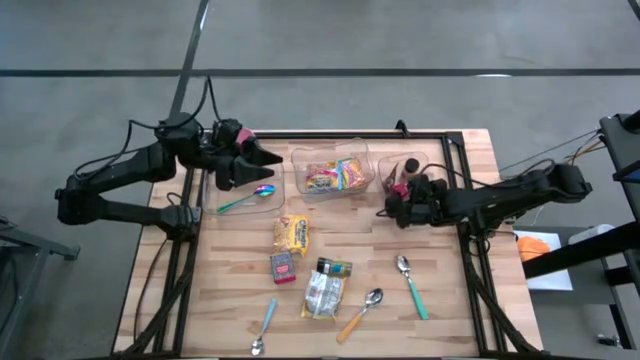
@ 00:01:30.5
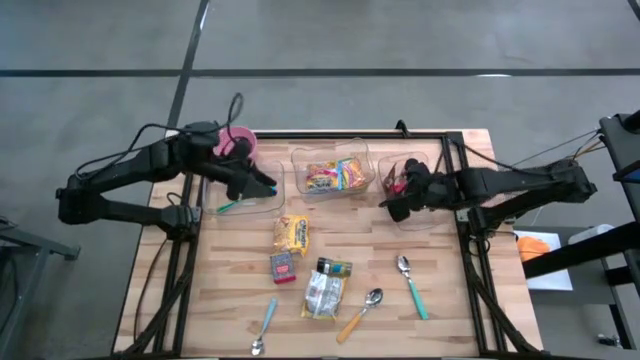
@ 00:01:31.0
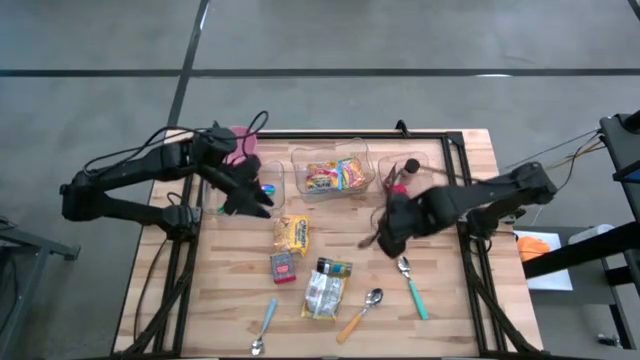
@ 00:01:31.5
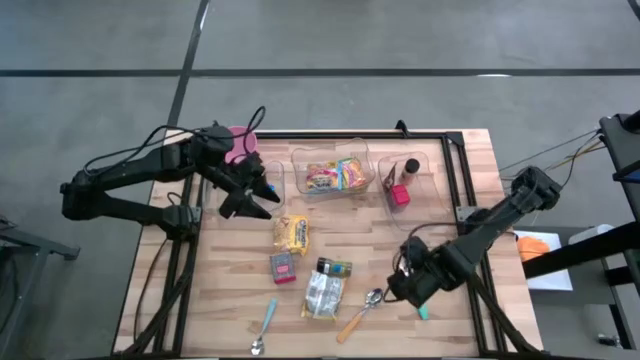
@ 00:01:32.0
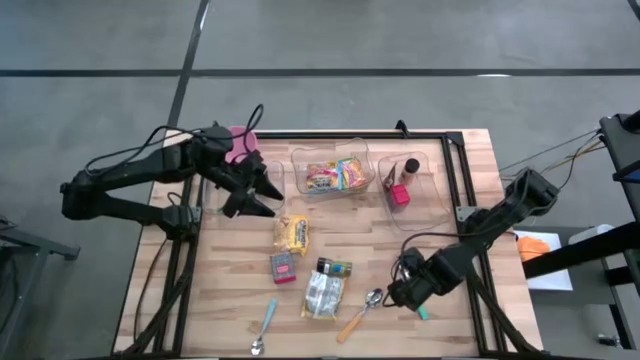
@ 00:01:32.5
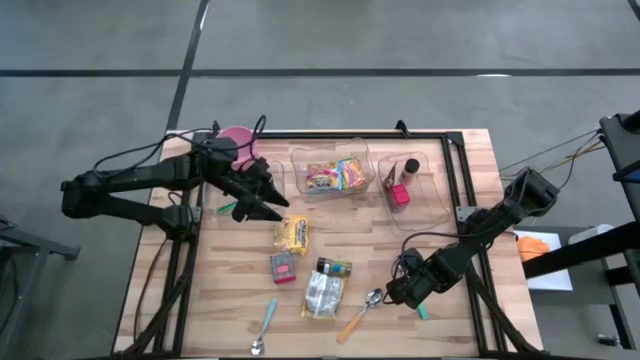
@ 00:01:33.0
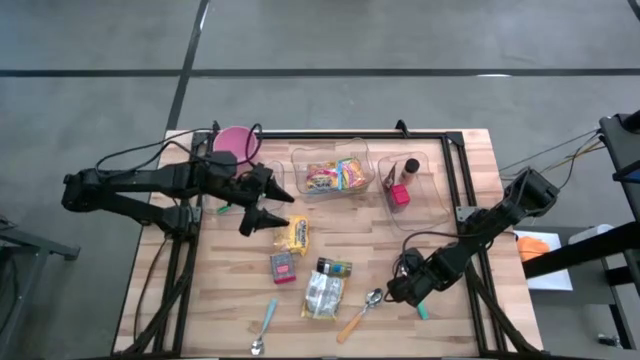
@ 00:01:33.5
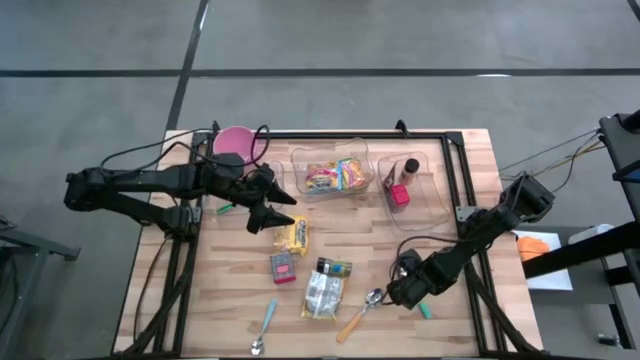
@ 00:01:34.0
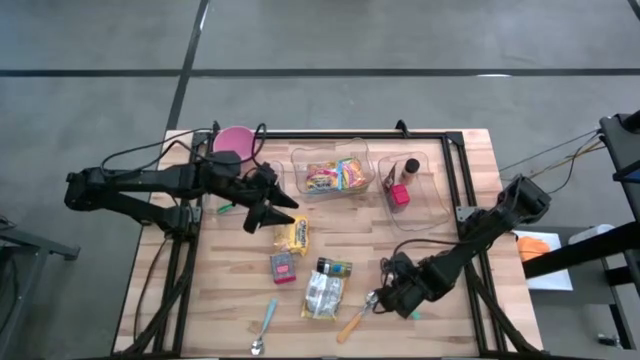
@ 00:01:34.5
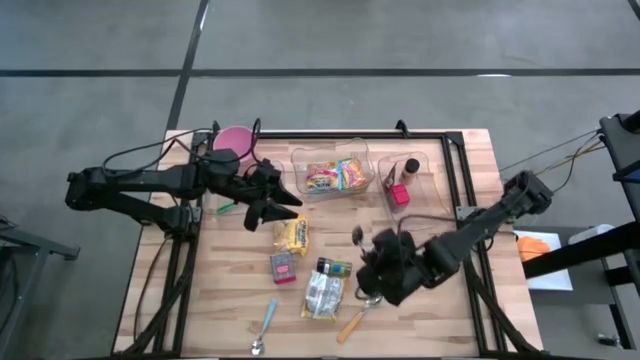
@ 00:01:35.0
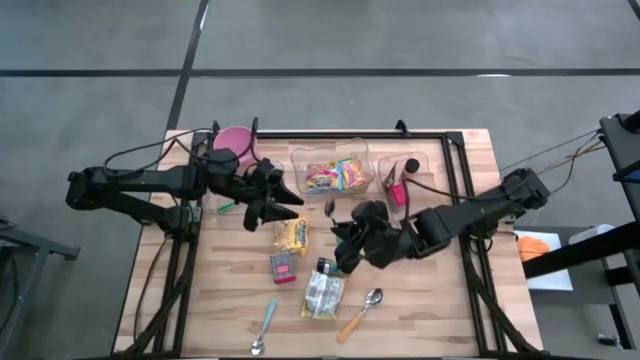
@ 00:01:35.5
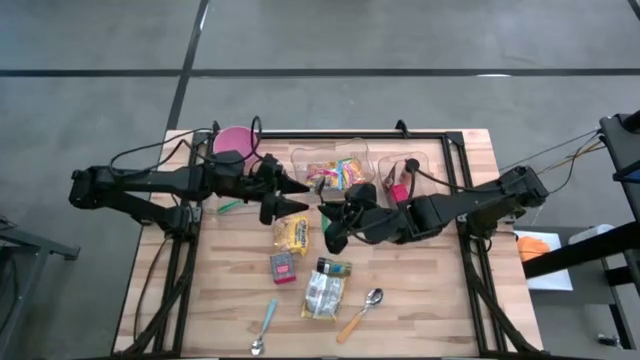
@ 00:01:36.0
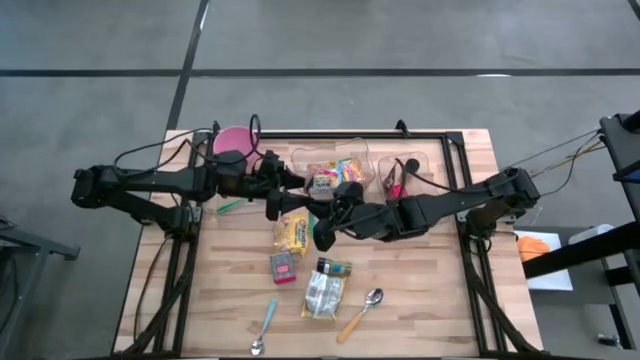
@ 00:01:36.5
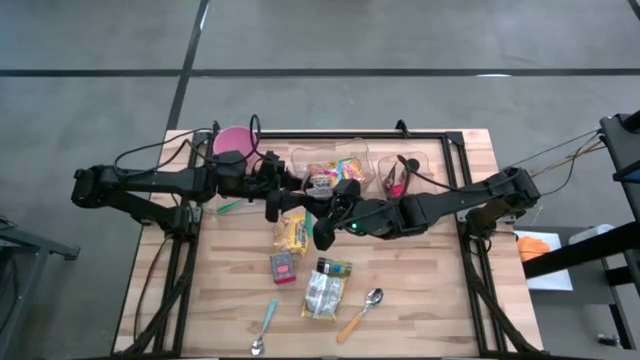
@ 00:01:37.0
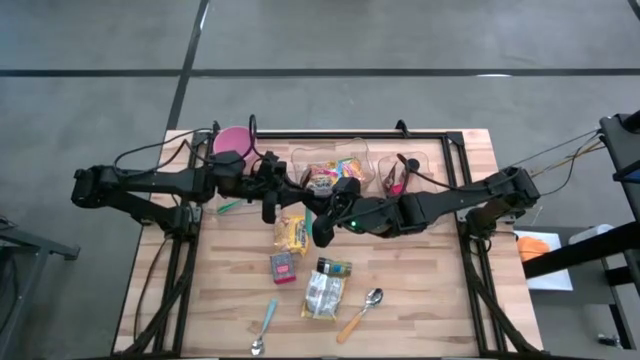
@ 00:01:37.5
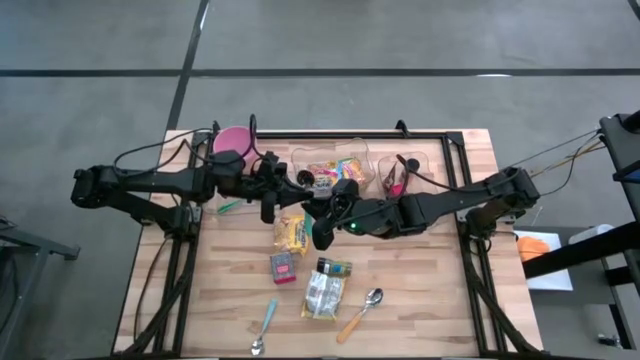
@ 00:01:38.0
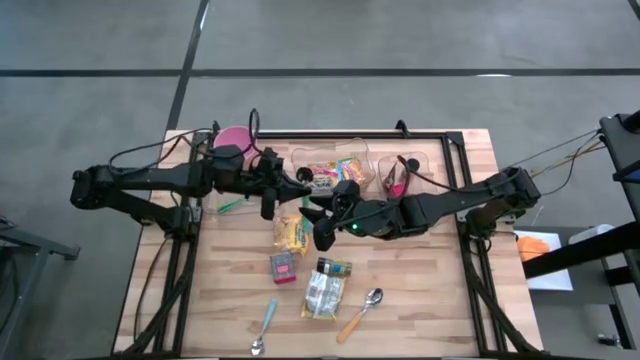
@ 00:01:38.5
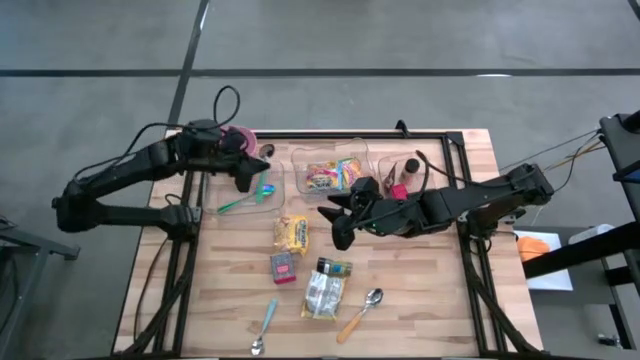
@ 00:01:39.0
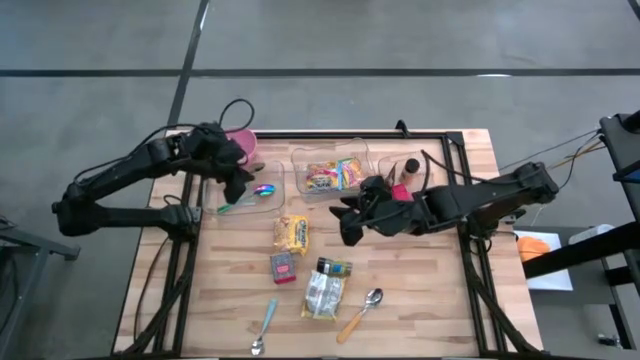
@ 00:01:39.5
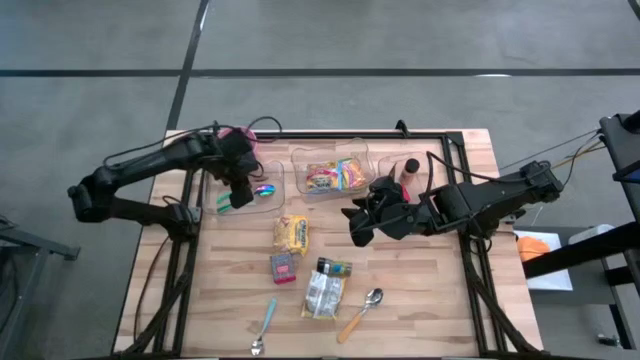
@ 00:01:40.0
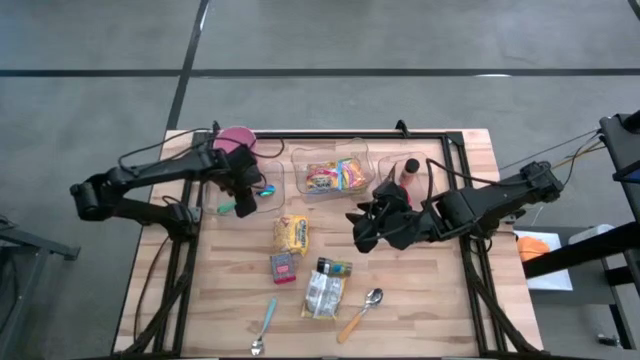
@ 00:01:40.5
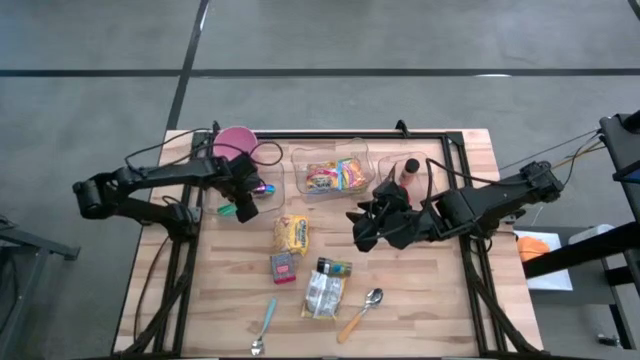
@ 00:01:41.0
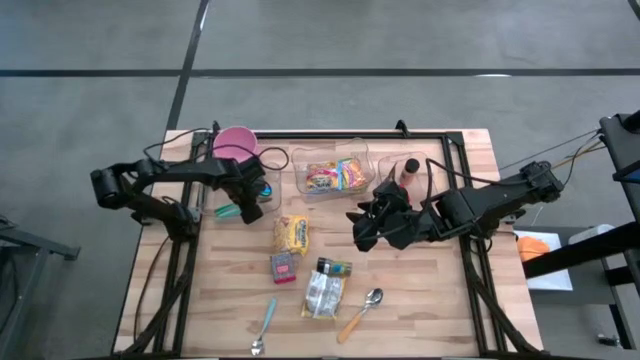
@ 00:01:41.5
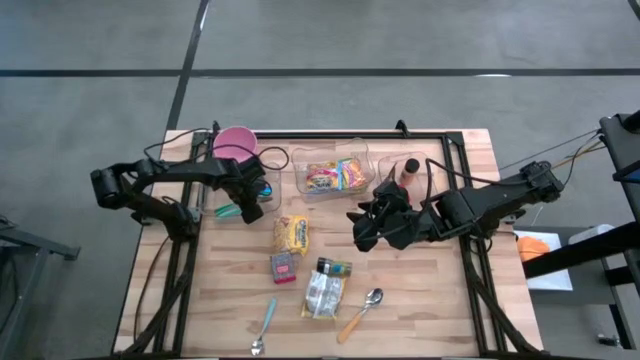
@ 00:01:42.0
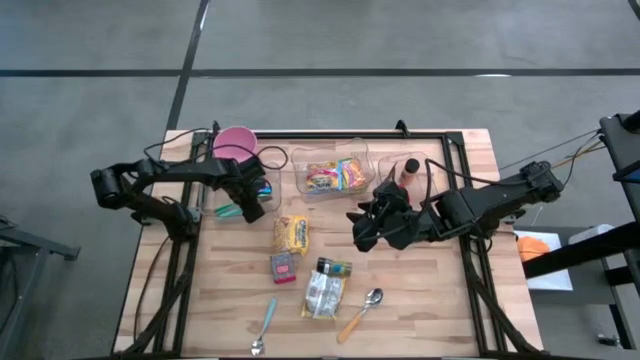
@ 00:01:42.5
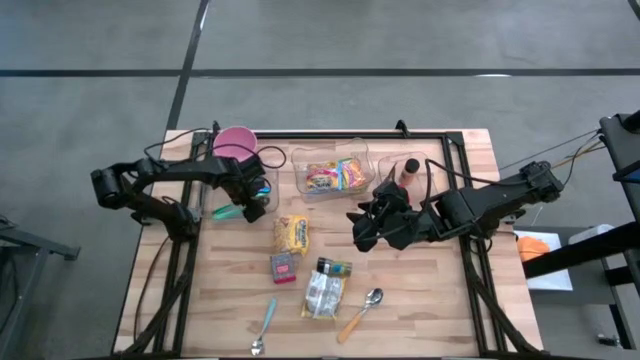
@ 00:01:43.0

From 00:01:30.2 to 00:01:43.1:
Put the green spoon into the left transparent bin

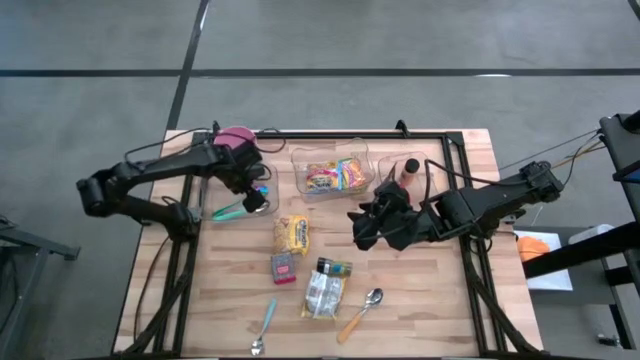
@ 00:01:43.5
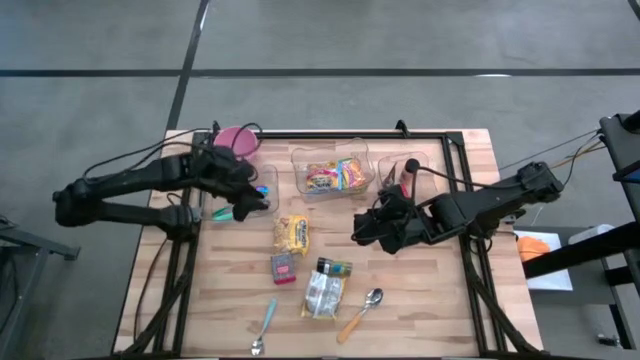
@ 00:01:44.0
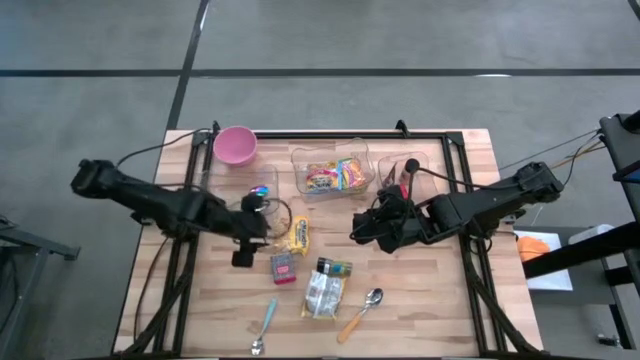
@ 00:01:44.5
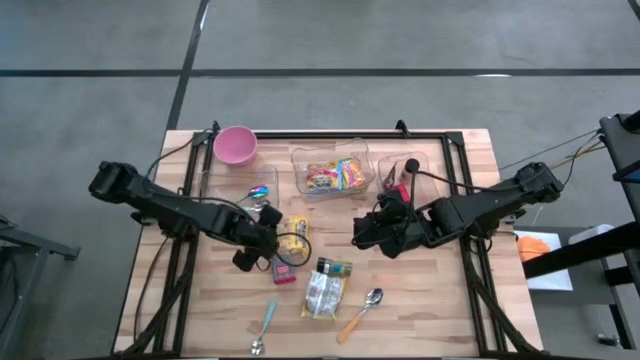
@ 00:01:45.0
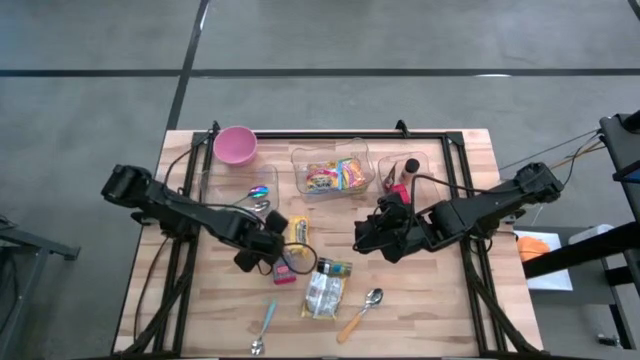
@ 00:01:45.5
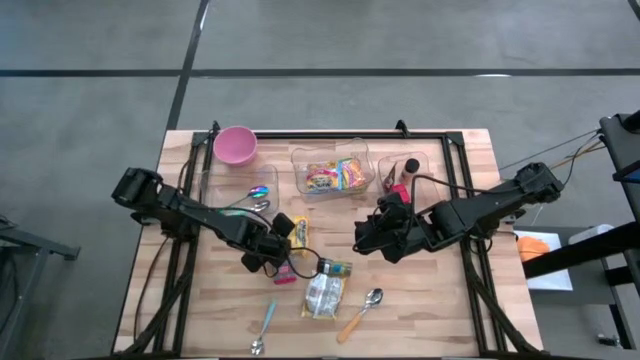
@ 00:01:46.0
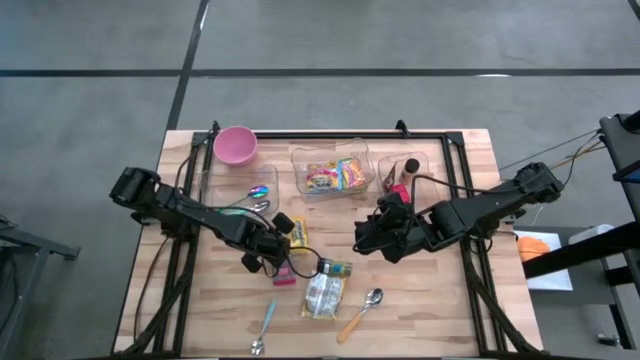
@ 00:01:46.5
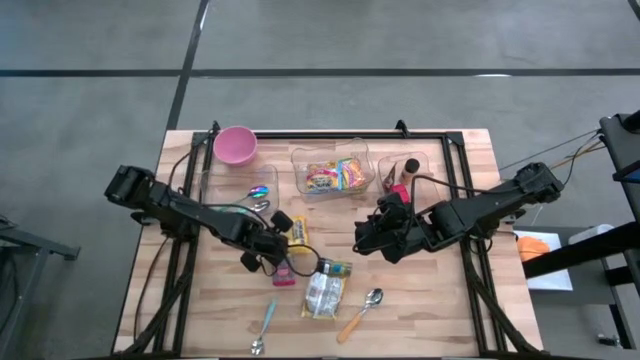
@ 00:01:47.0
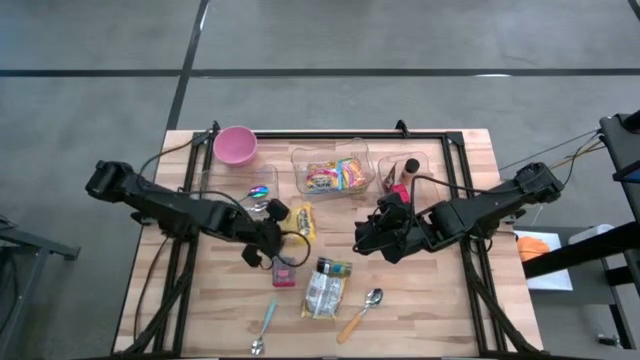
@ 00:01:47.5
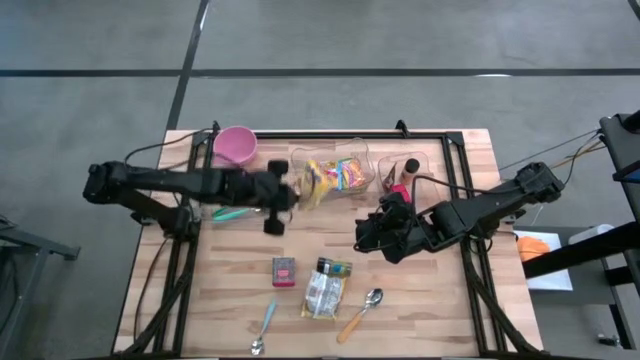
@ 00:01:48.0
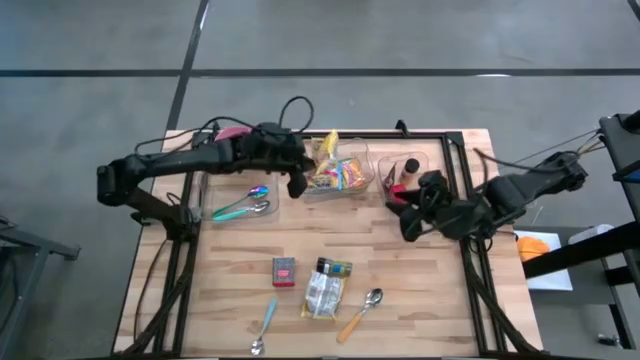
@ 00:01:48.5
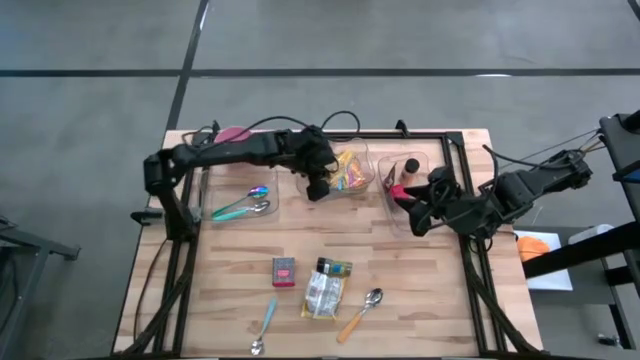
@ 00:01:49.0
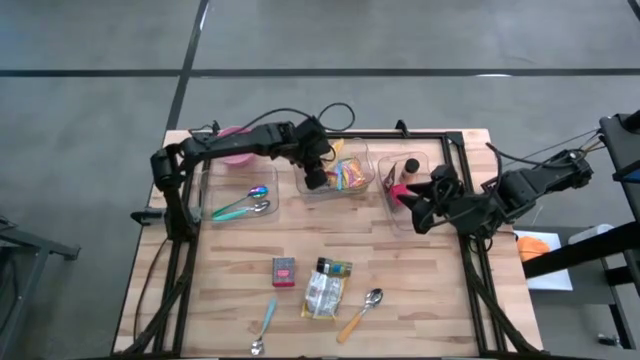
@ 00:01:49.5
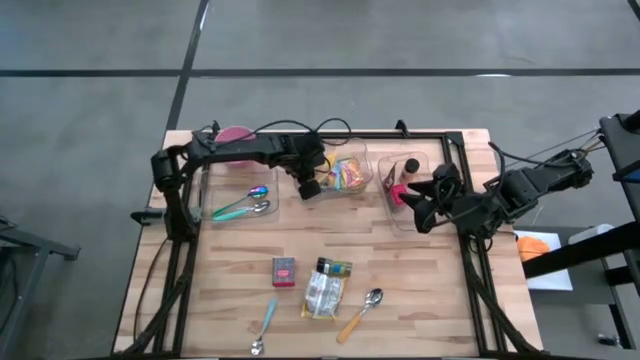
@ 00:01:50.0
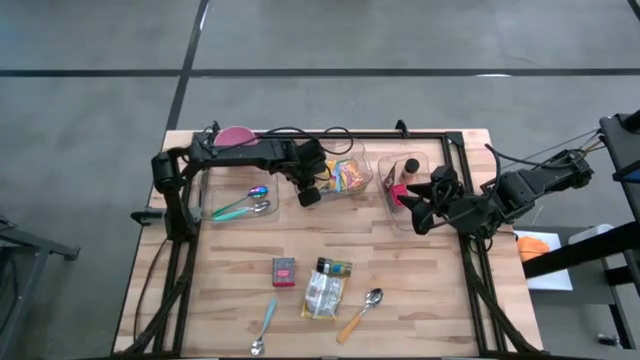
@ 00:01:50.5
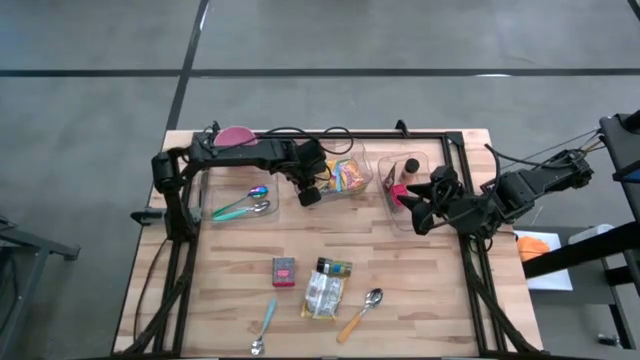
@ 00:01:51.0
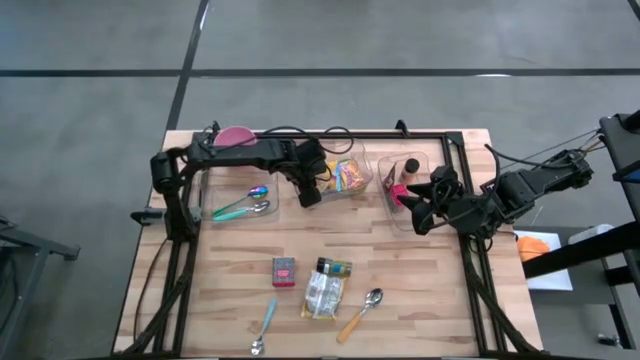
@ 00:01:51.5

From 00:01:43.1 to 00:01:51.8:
Put the yellow noodle pack into the middle transparent bin
